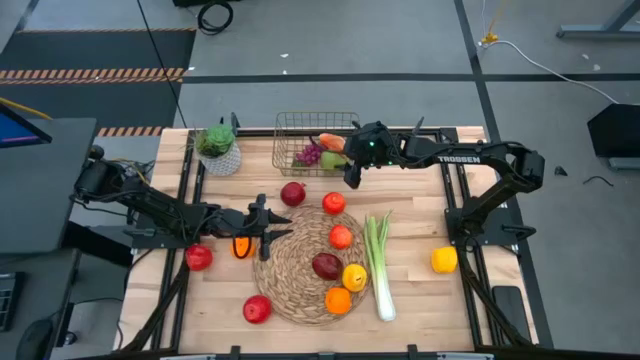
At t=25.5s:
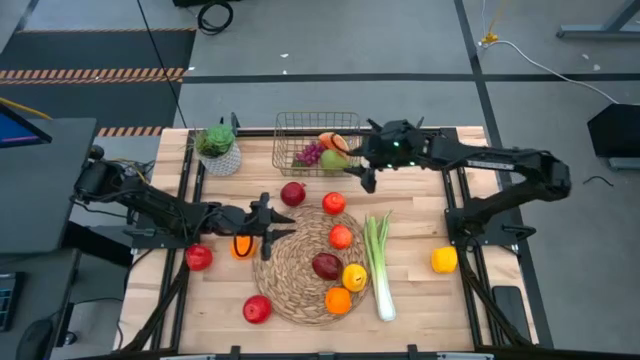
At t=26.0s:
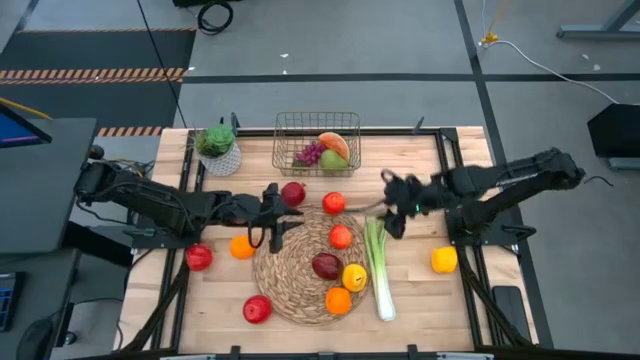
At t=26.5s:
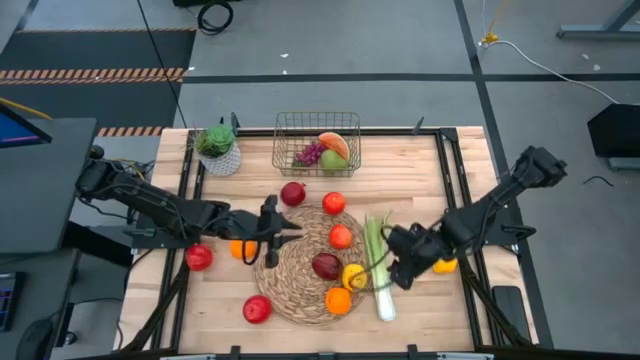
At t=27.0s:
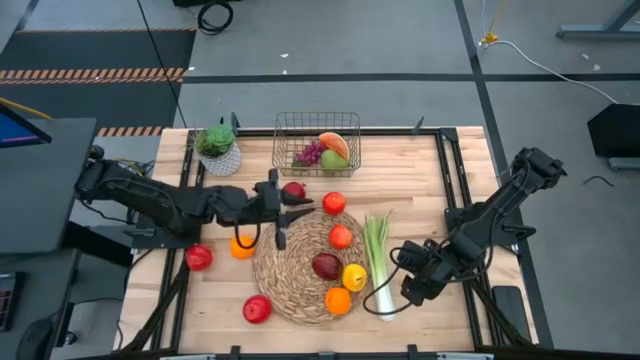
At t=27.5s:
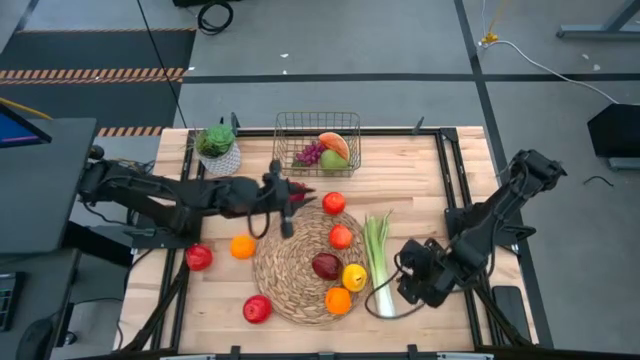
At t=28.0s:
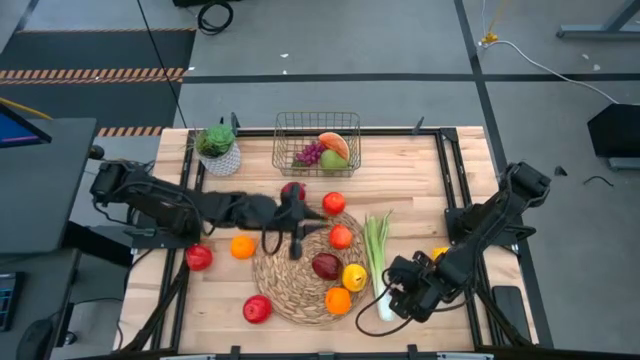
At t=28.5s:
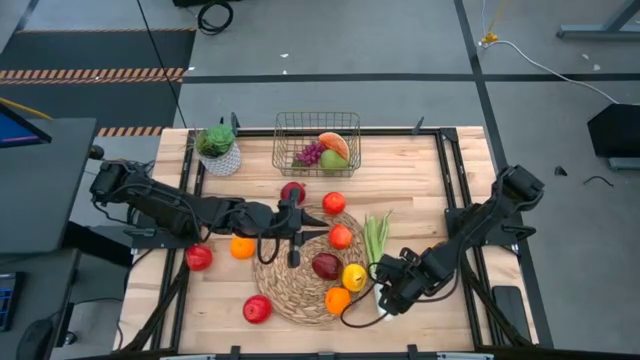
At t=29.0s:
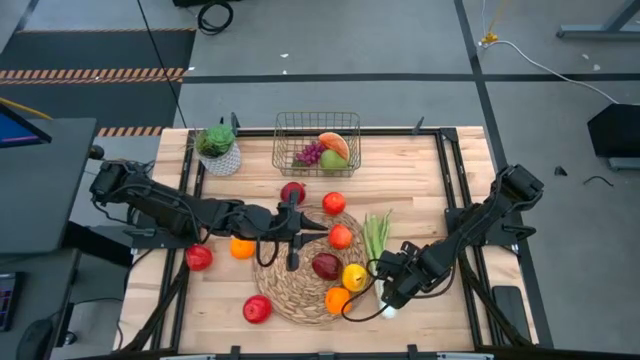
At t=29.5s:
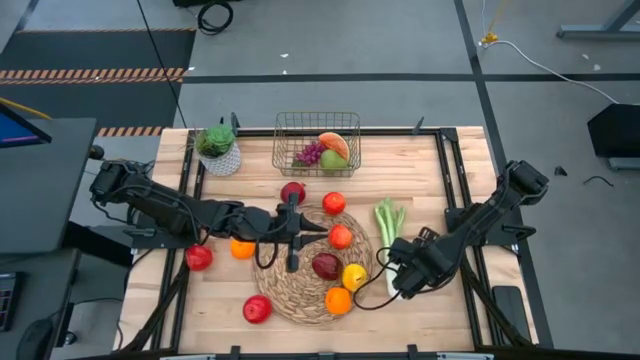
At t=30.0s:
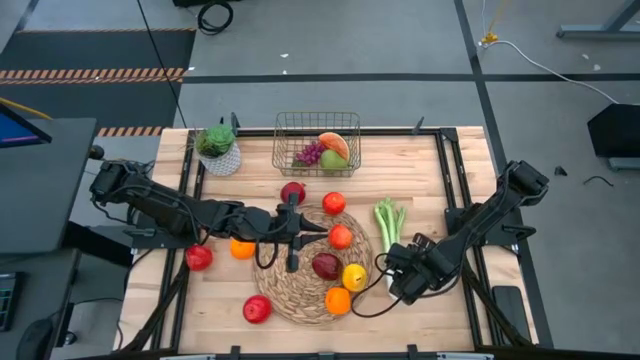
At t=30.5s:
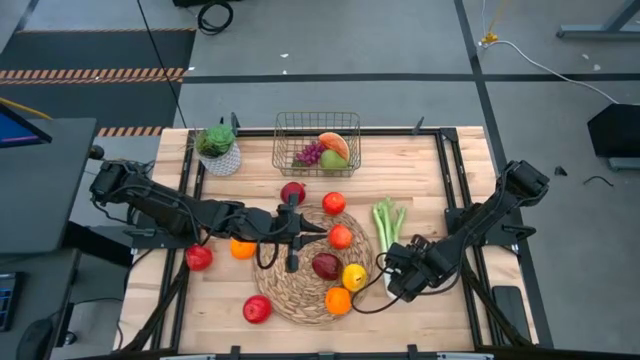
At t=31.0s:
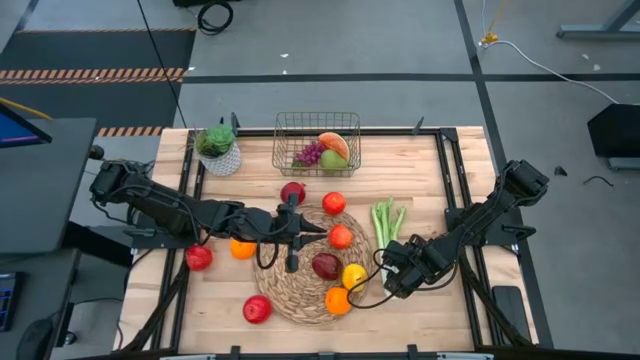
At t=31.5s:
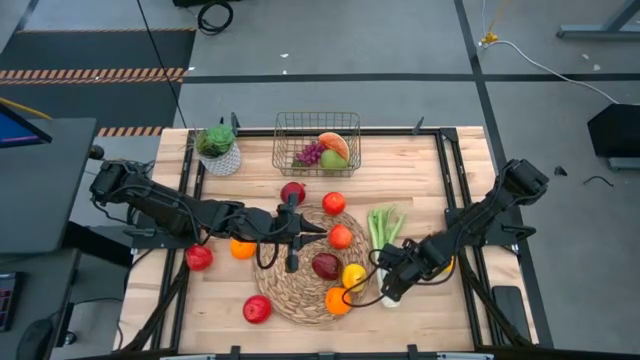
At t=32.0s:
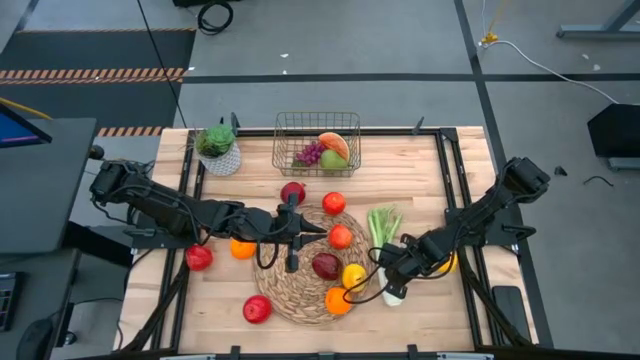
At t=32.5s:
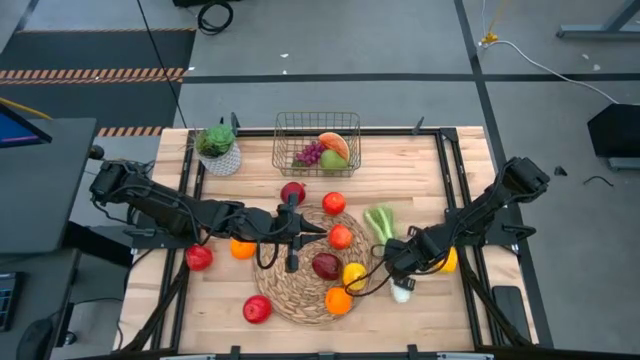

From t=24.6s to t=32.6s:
Task: Build produce basket
Put the celery into the wire basket

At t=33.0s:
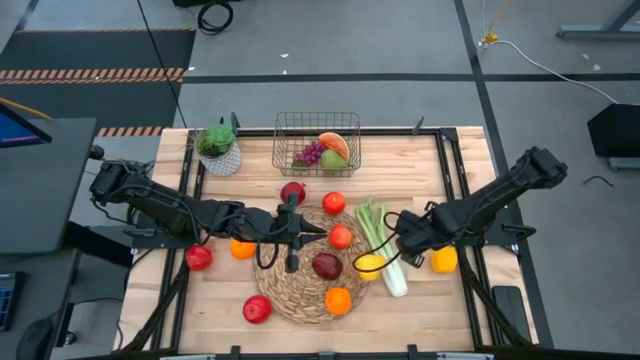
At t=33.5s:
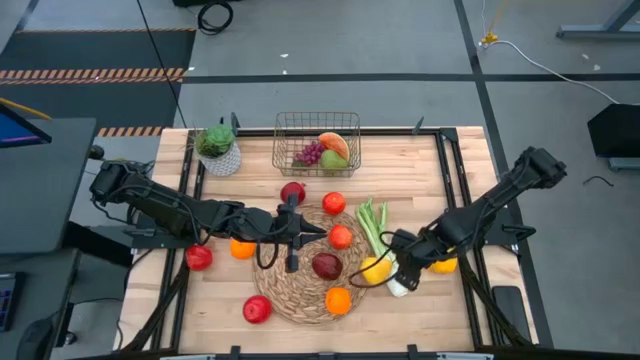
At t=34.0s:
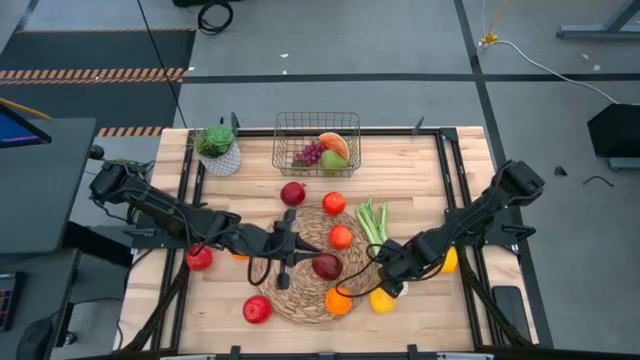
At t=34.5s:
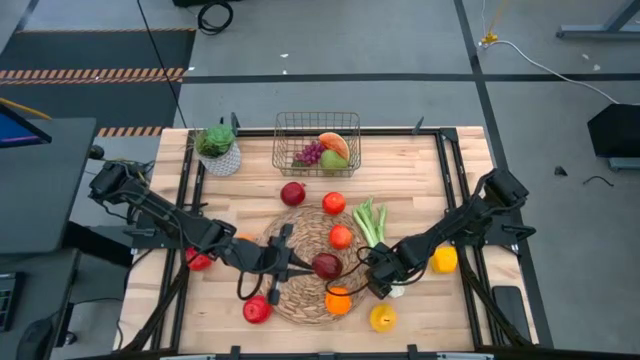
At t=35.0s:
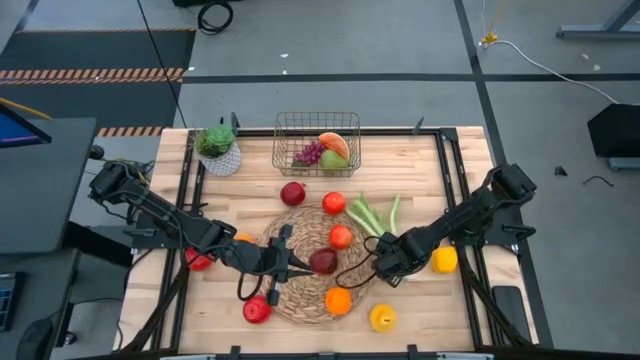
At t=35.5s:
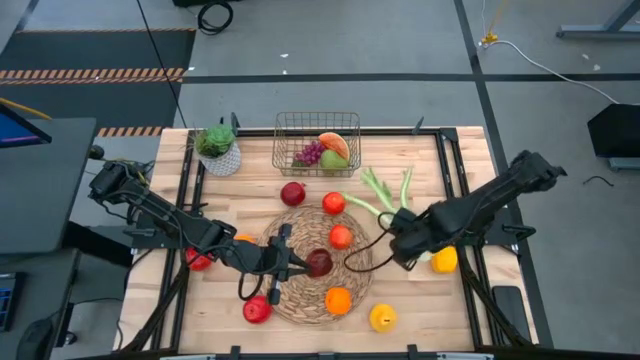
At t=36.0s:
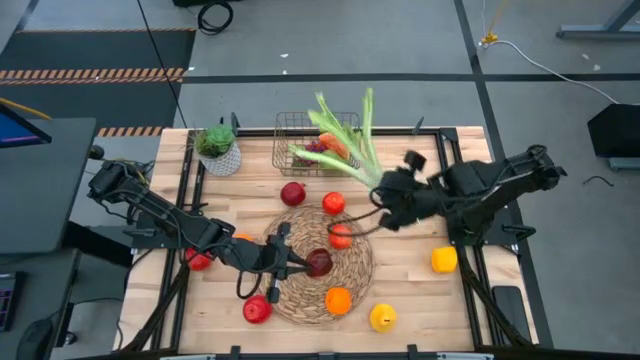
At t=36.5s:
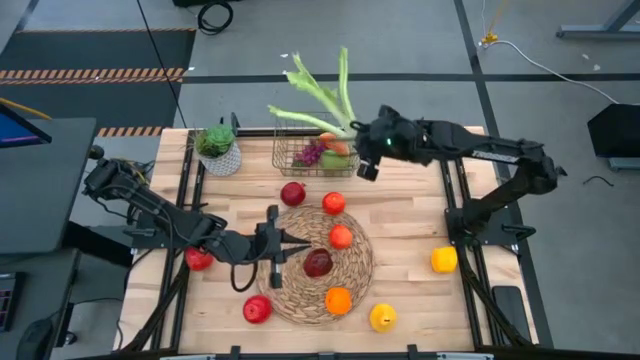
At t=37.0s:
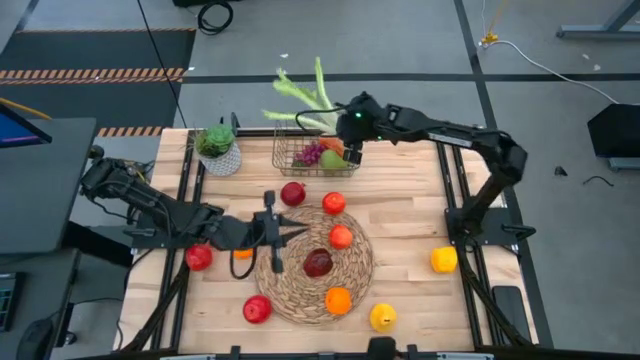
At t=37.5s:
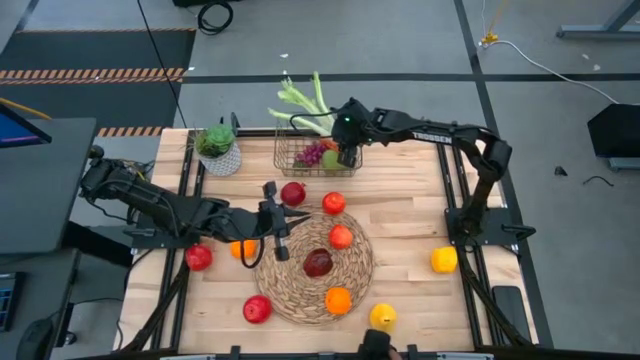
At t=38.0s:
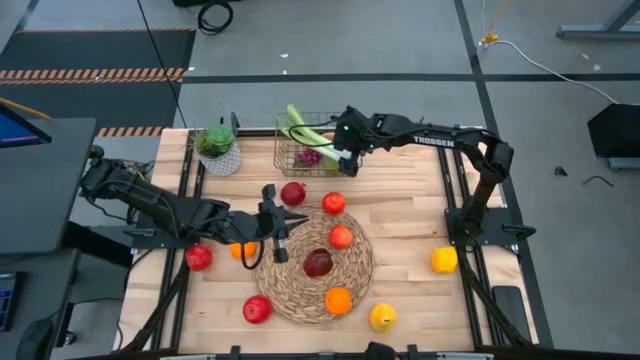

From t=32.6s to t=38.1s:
Put the celery into the wire basket

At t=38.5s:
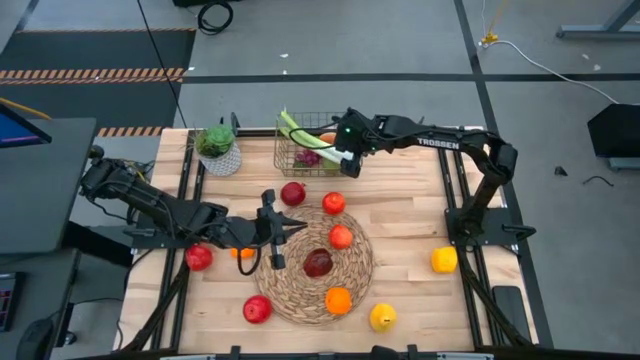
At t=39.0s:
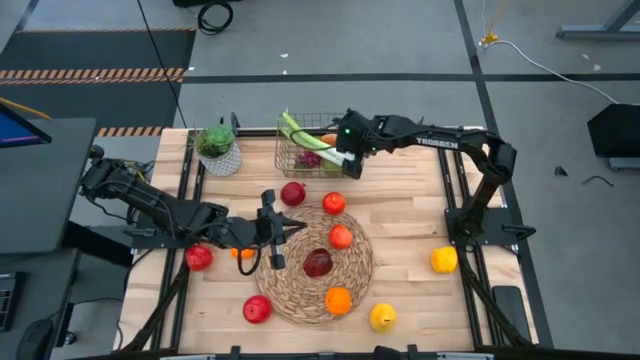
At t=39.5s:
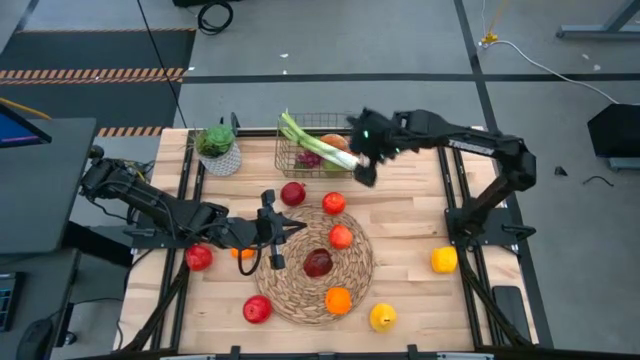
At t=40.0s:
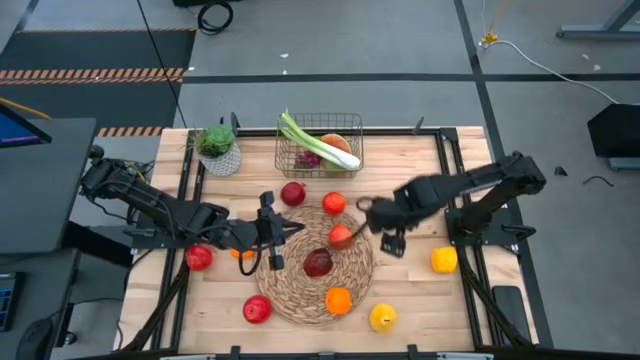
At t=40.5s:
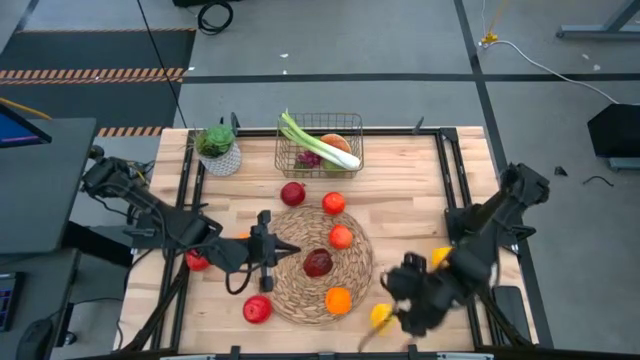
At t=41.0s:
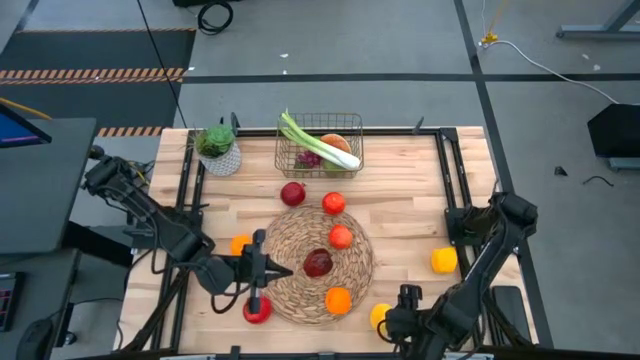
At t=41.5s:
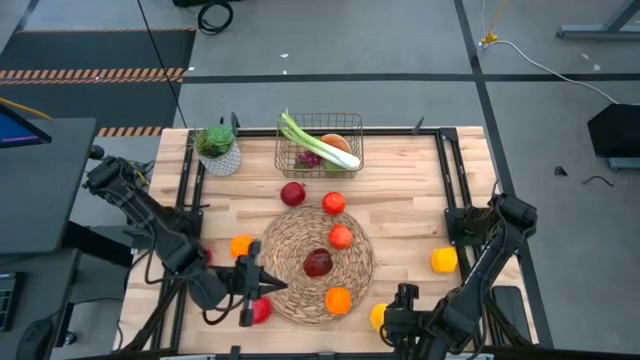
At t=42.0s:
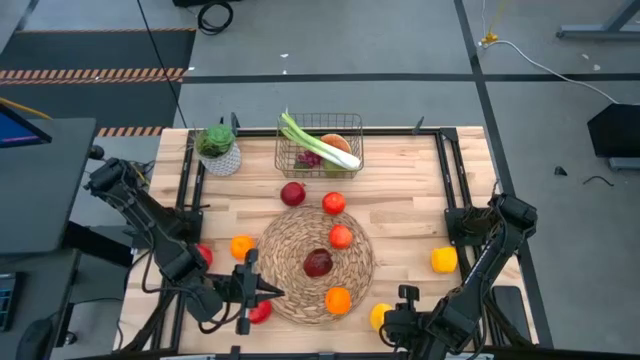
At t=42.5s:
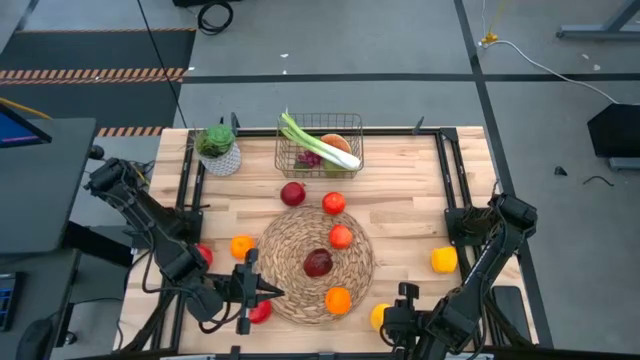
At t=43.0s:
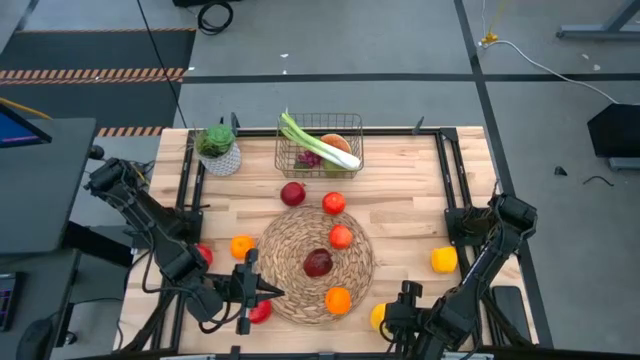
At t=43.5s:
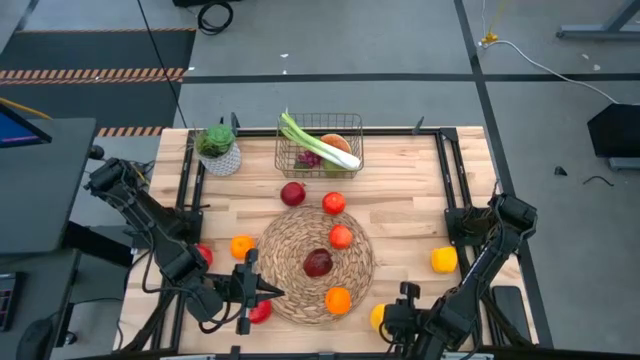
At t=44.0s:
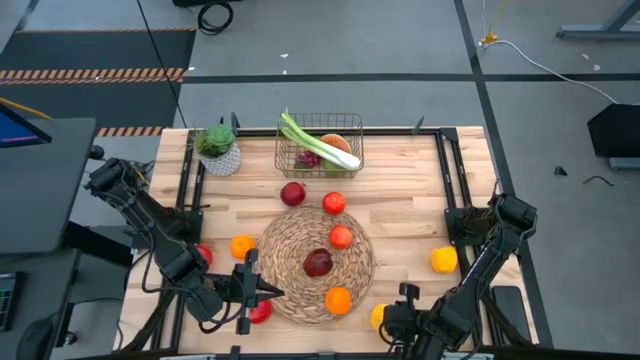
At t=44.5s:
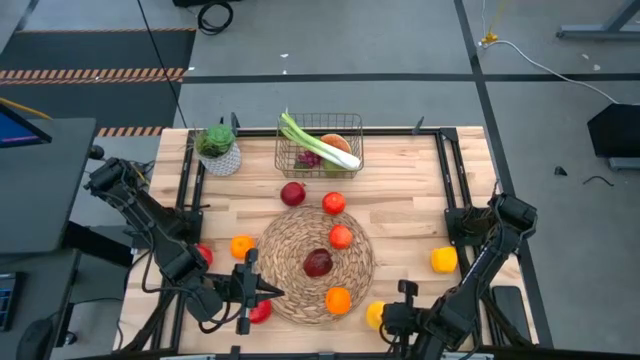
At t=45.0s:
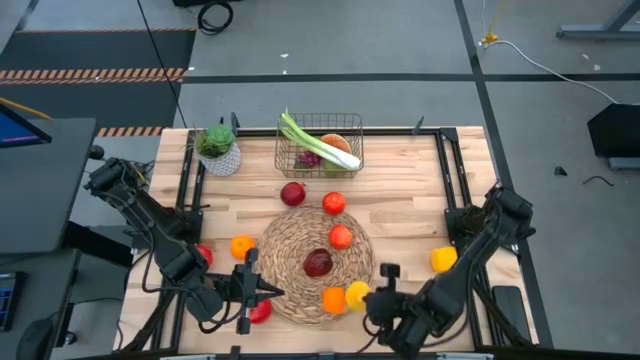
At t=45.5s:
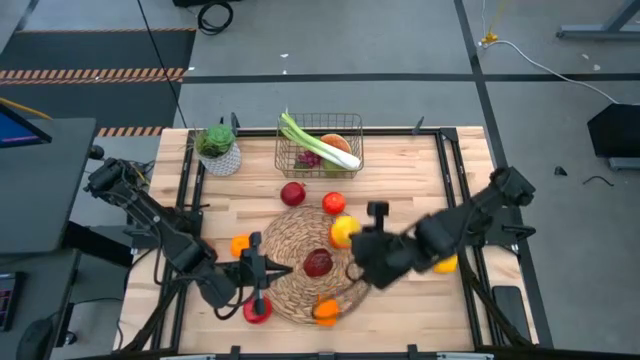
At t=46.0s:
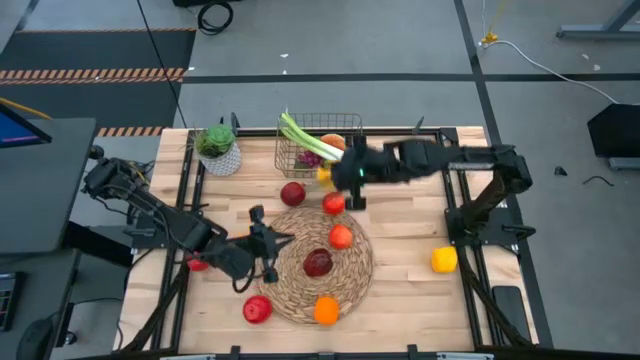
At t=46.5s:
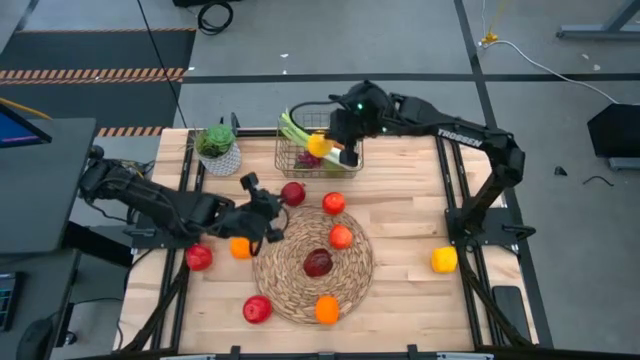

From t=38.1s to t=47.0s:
Put the yellow pear into the wire basket
